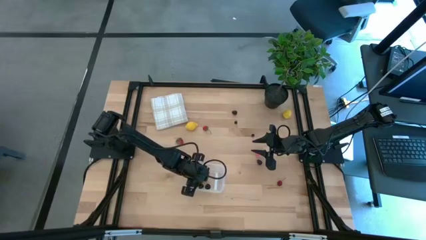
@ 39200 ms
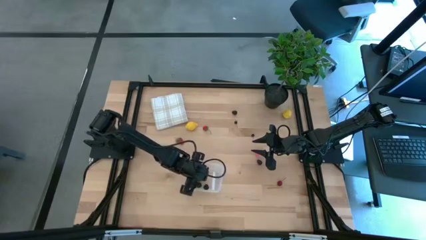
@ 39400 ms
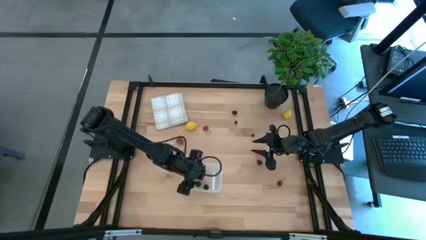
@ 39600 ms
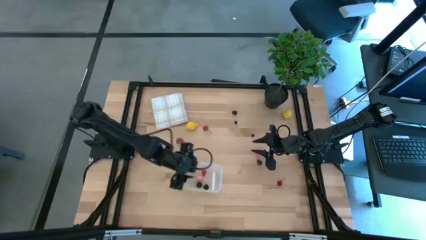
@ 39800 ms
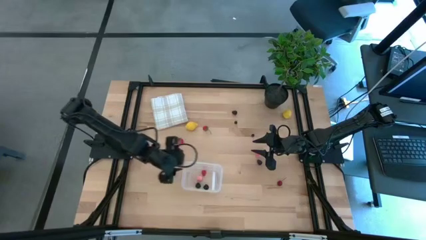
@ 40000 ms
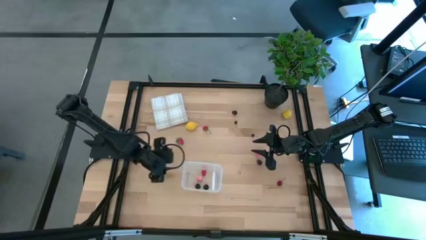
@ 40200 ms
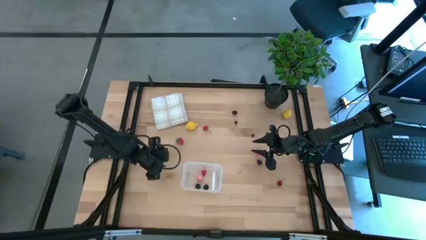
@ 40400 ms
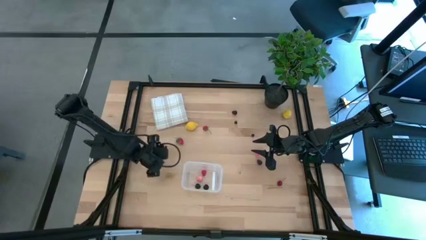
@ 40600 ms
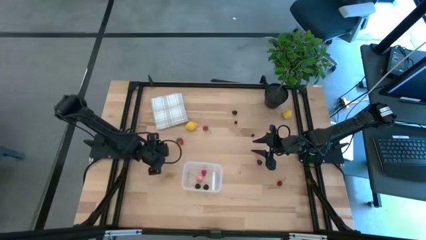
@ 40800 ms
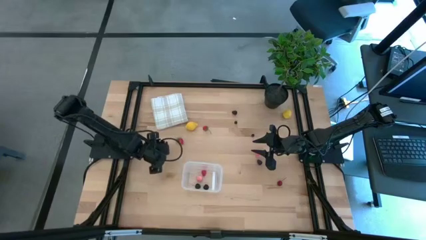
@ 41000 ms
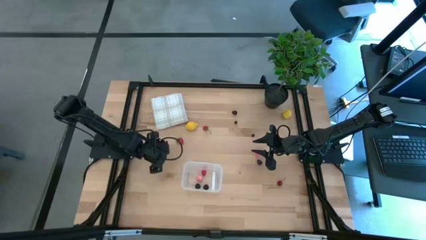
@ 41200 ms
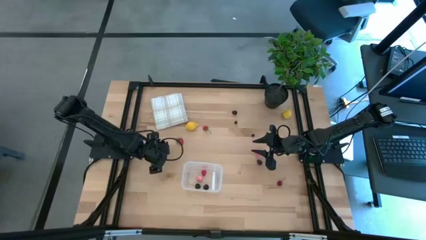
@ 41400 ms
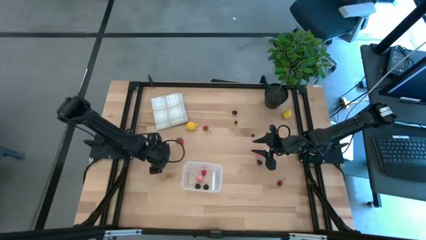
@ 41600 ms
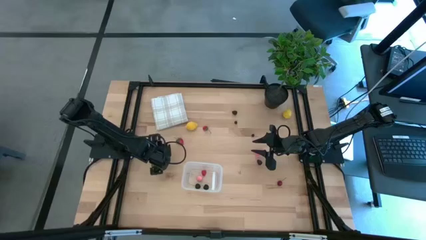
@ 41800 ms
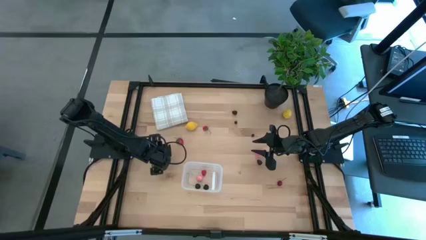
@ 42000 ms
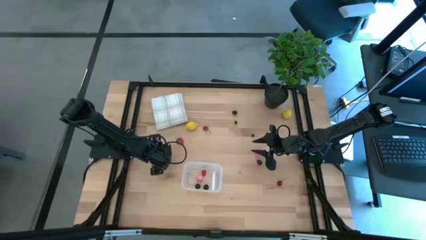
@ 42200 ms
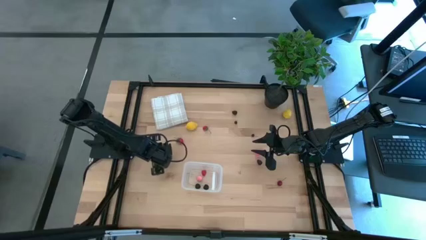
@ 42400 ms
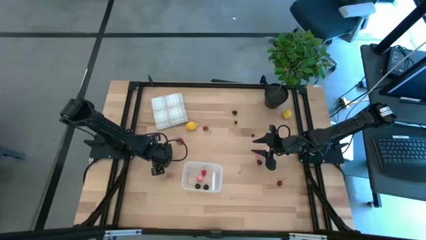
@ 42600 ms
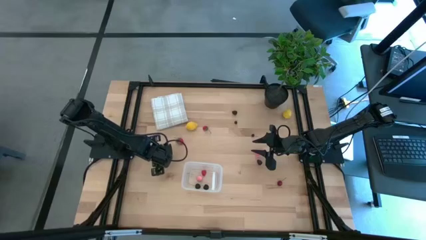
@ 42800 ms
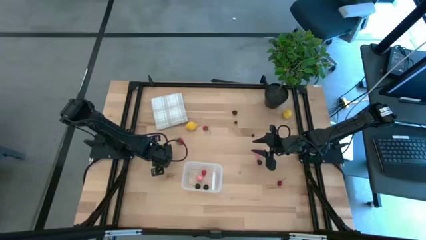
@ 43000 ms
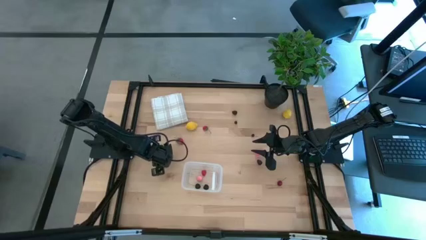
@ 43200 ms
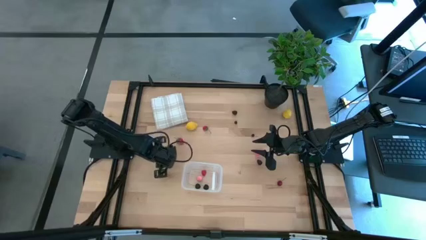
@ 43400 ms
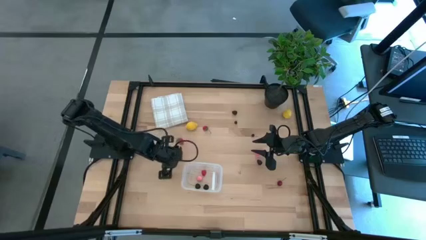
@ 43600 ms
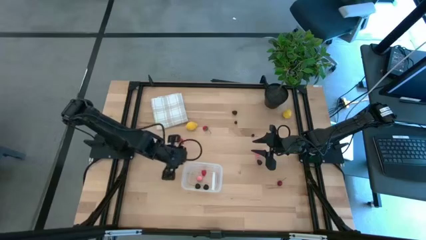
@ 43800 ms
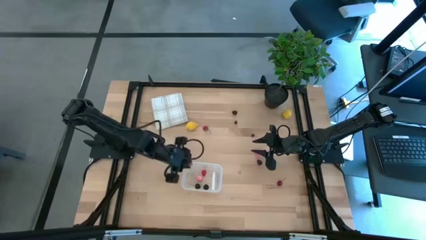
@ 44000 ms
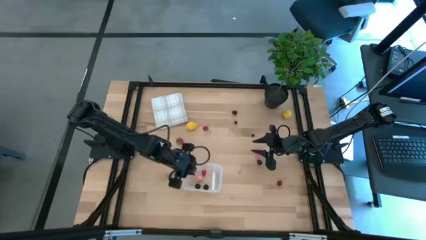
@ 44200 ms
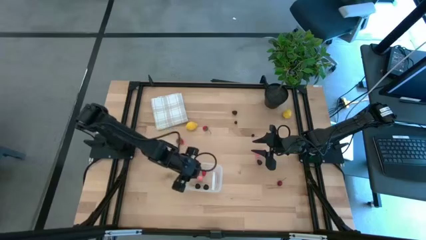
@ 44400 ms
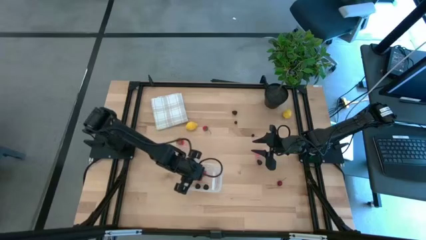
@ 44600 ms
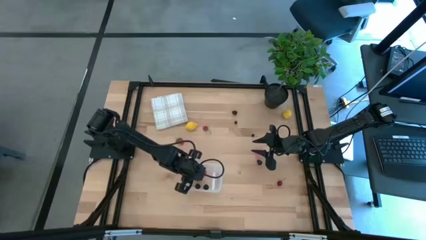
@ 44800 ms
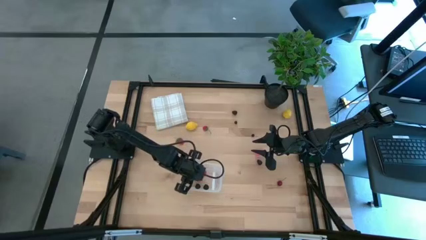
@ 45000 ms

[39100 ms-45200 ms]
Task: Pick and placing Produce into tupperware
Put the bottom strawberry into the transparent bin

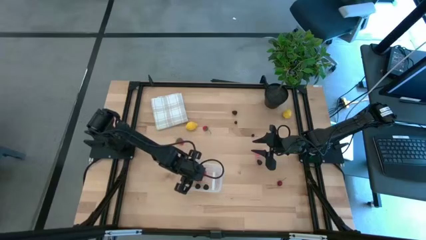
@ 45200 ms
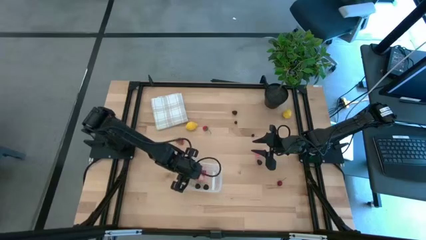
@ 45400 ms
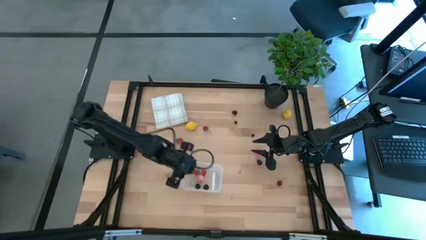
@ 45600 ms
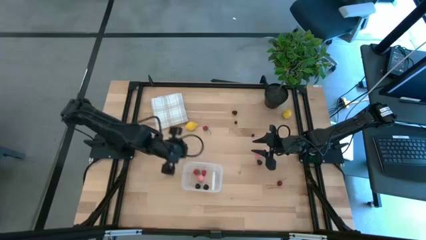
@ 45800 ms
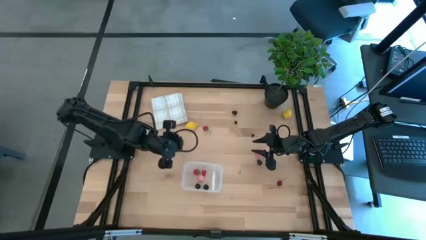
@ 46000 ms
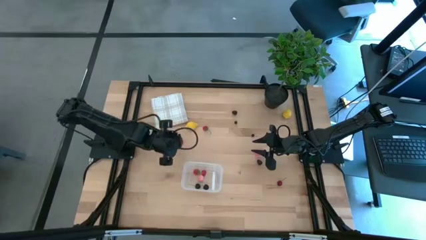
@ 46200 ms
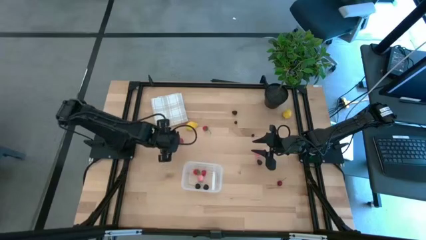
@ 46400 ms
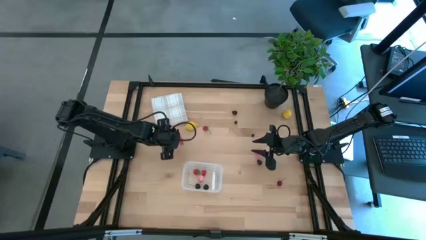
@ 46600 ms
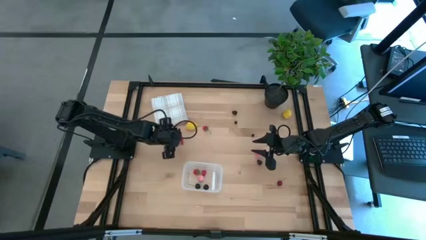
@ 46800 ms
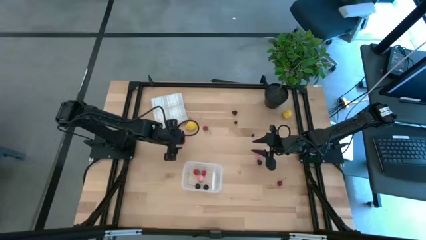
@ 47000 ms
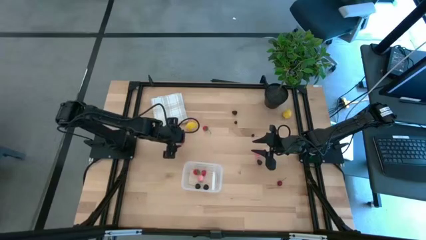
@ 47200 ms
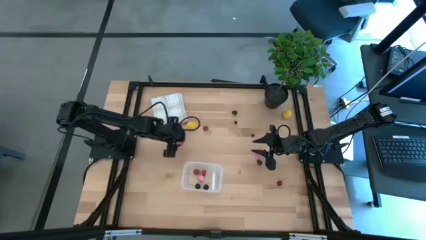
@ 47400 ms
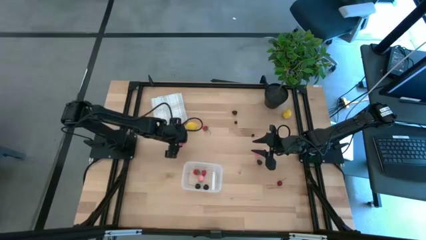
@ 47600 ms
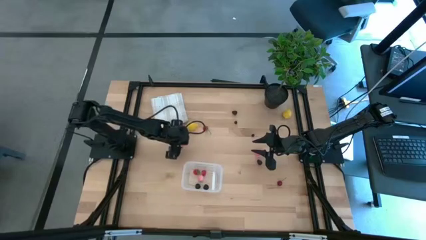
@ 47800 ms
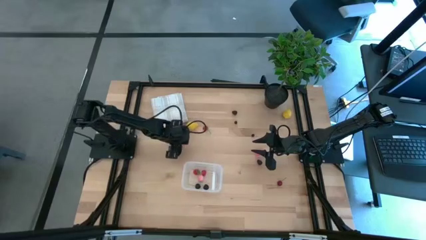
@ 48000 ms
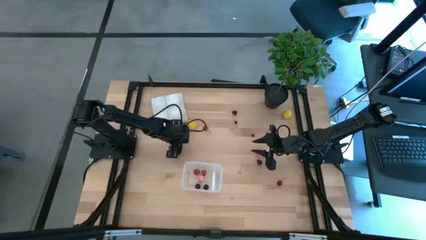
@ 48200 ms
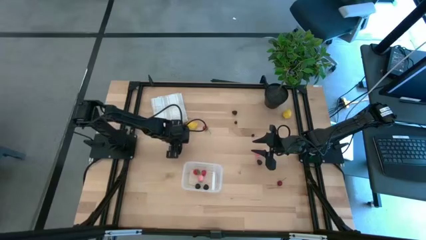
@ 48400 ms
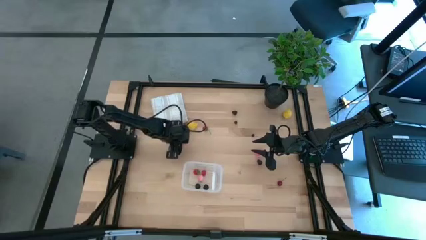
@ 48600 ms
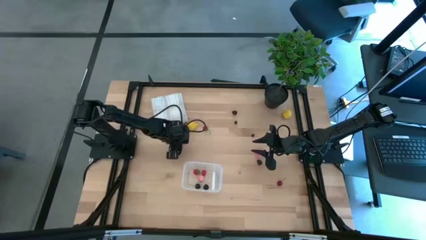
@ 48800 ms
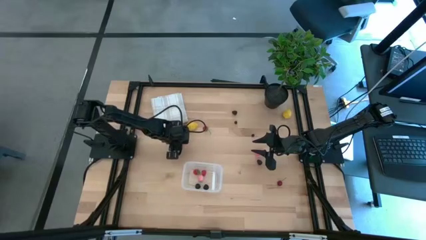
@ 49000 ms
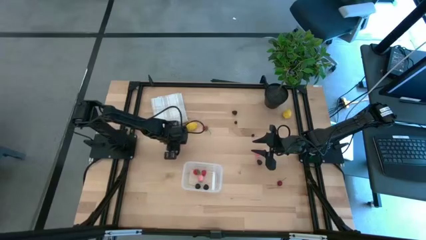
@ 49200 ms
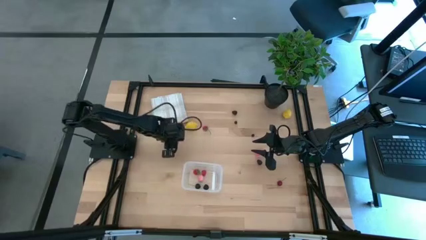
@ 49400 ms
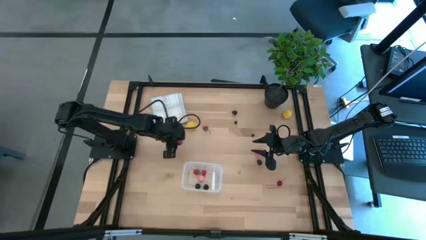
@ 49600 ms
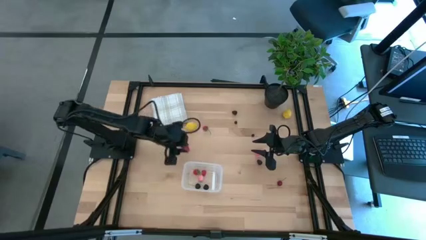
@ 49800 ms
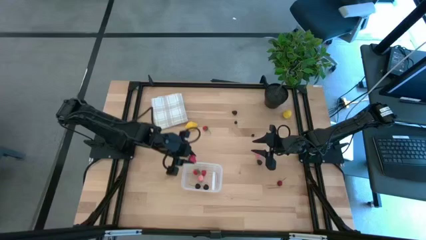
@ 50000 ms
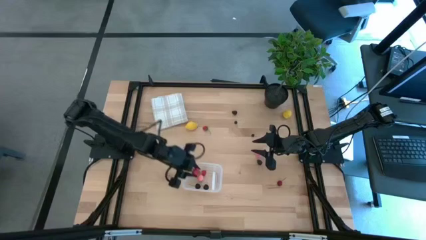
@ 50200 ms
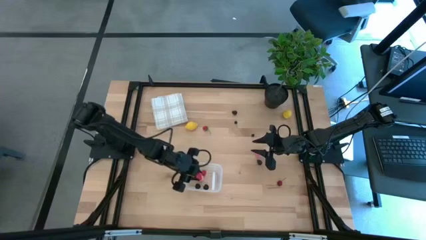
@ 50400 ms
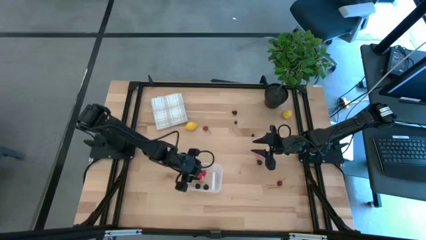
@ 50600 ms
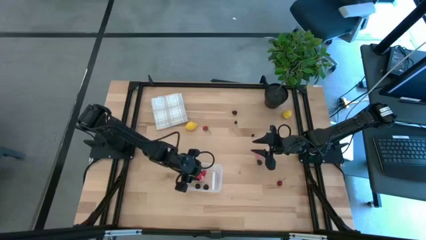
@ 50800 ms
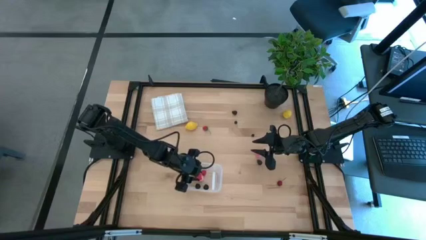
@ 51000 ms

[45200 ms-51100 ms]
Put the bottom strawberry into the transparent bin

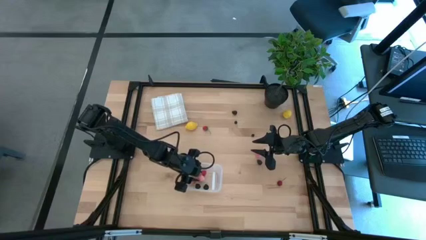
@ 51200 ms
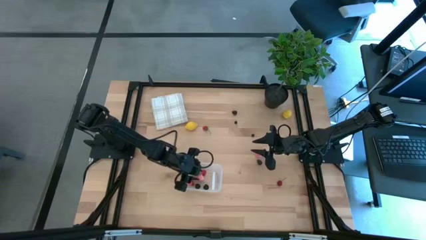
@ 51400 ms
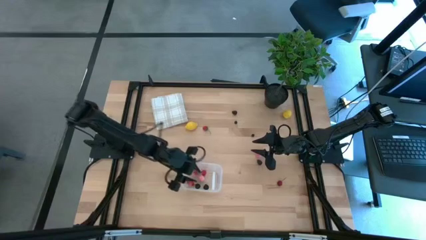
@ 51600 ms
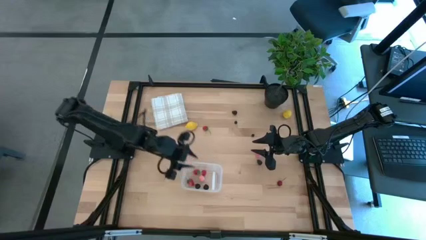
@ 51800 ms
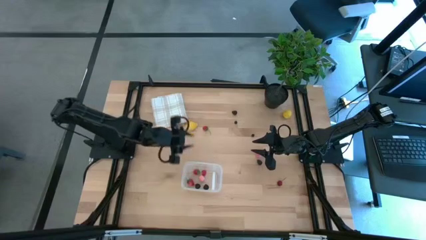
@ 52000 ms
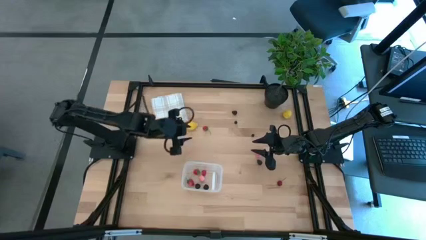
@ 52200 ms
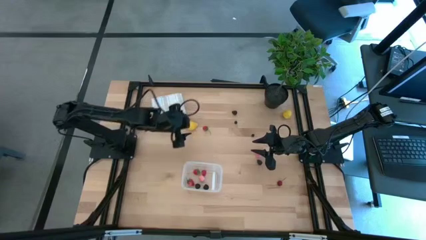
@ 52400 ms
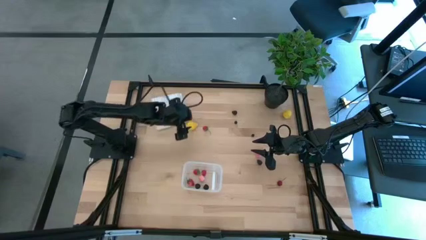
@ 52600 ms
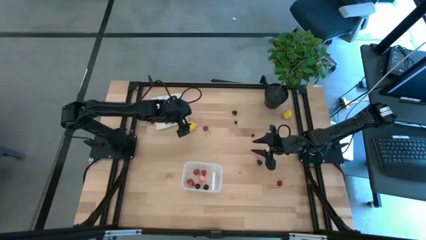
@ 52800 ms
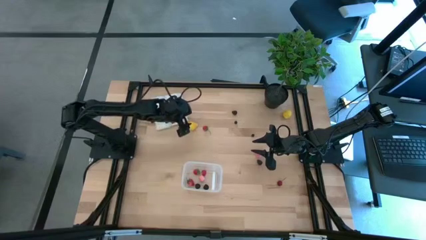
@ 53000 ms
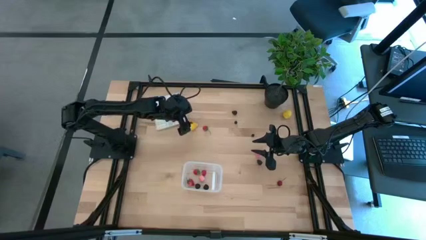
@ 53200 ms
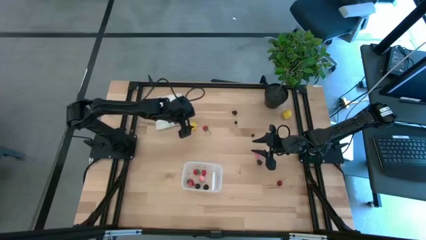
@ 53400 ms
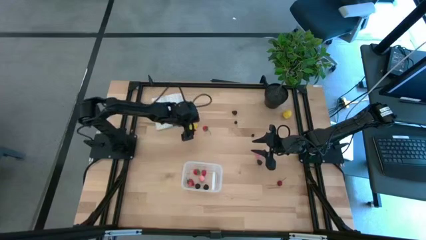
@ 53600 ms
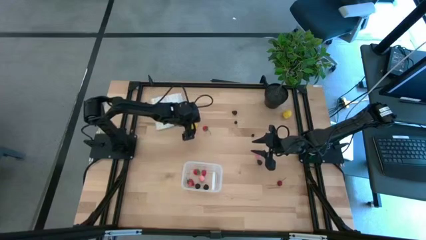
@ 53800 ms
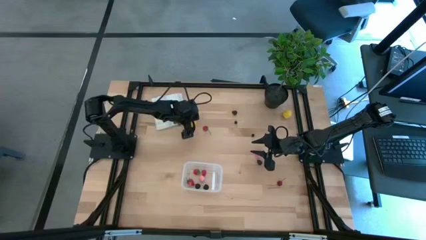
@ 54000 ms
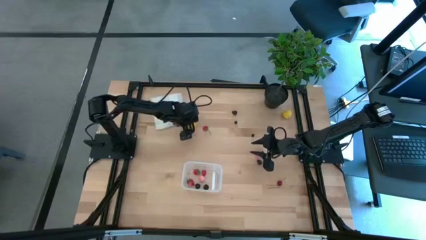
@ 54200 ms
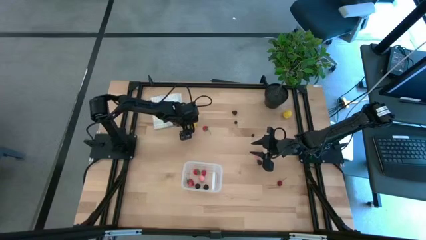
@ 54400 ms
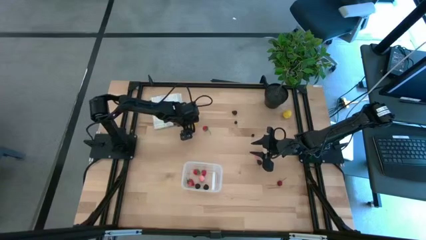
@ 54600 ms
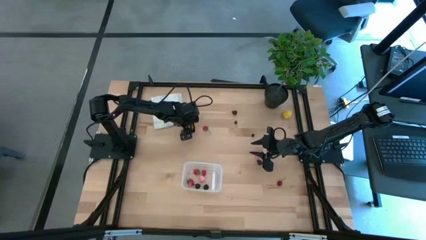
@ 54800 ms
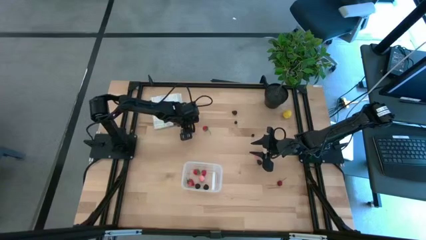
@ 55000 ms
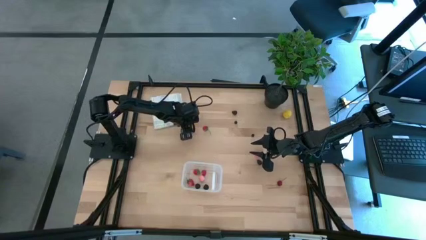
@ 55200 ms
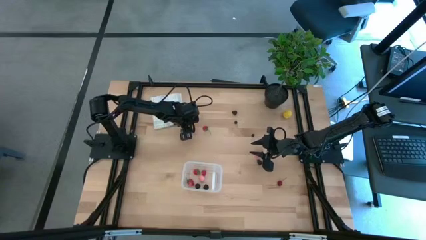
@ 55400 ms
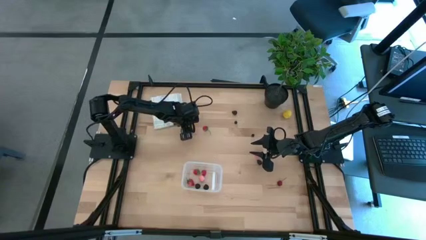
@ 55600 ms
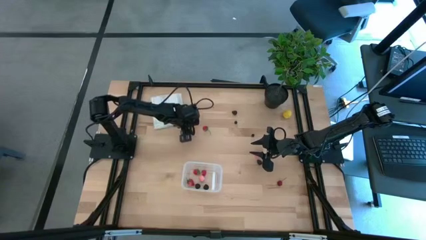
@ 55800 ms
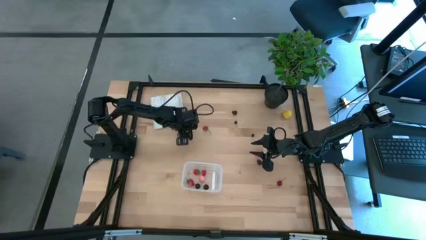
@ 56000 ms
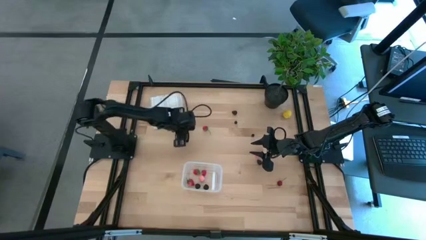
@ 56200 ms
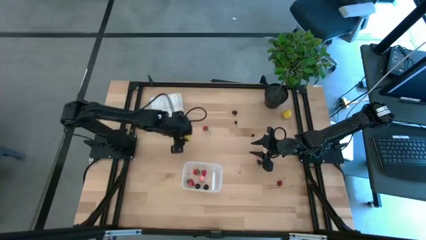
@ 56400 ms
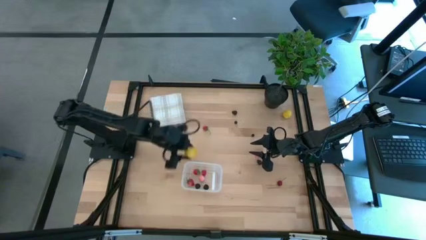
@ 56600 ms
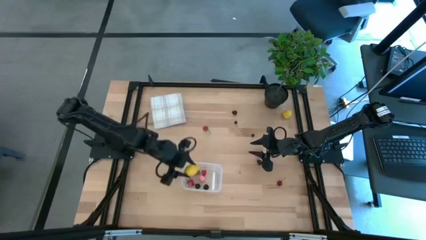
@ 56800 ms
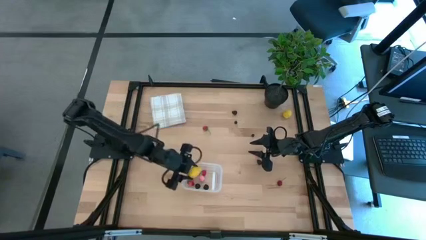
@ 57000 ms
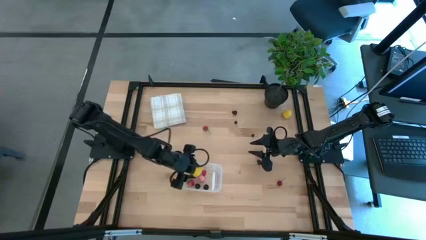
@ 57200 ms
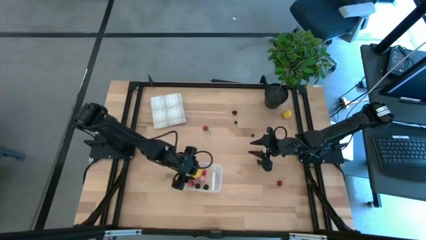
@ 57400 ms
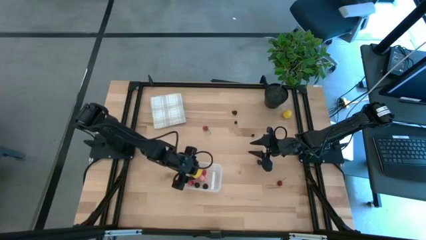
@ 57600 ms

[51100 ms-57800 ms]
Put the left lemon into the transparent bin
